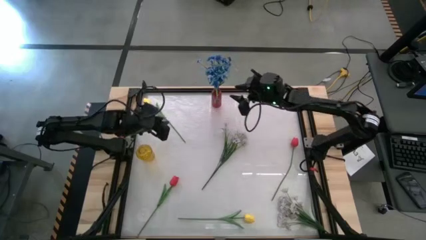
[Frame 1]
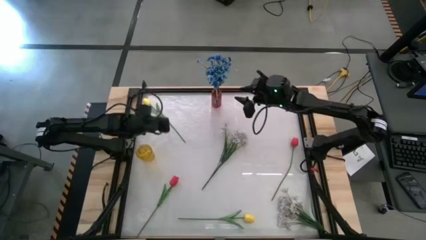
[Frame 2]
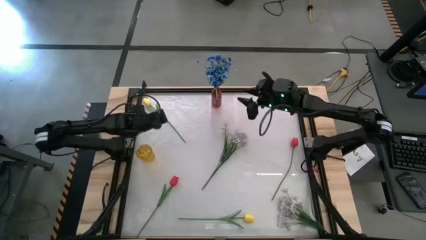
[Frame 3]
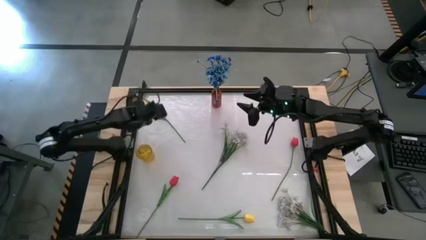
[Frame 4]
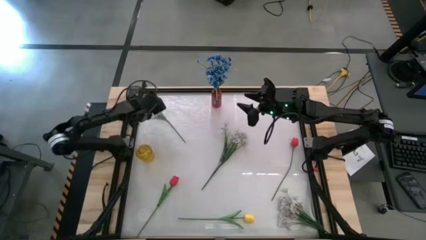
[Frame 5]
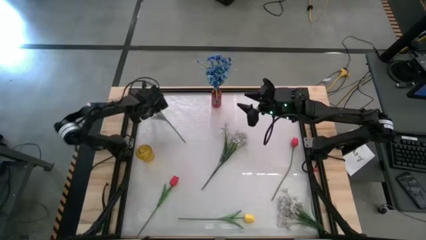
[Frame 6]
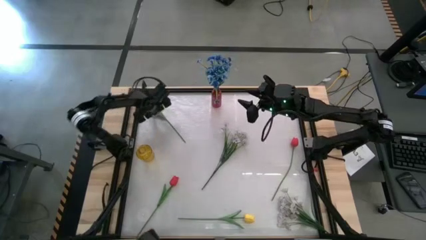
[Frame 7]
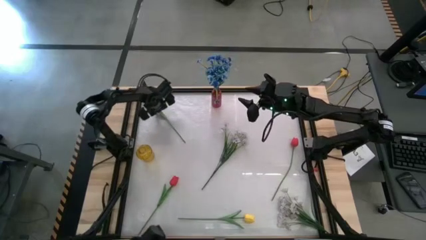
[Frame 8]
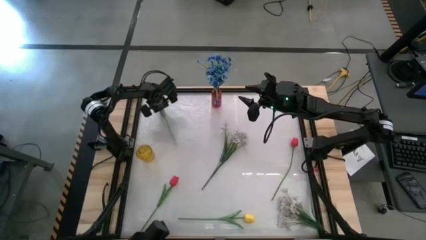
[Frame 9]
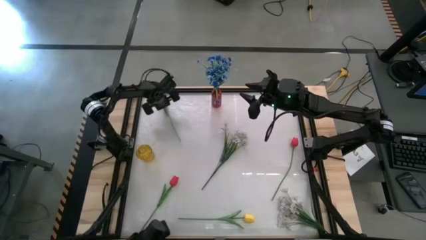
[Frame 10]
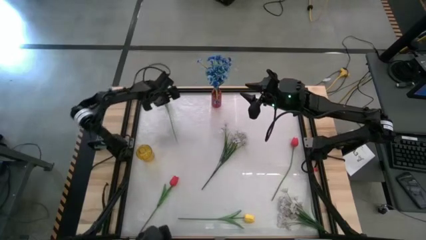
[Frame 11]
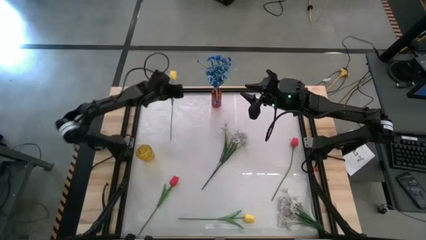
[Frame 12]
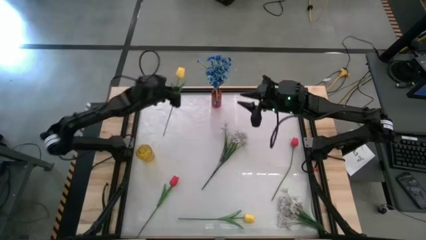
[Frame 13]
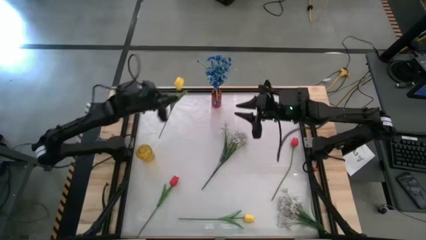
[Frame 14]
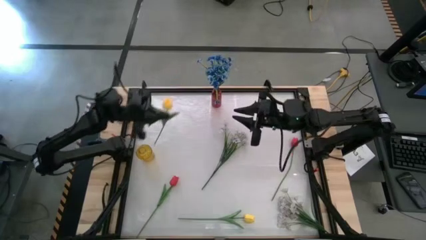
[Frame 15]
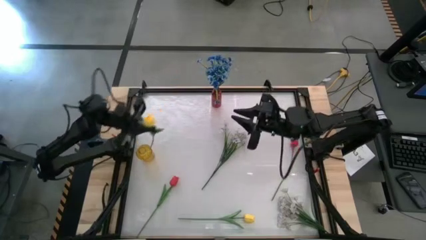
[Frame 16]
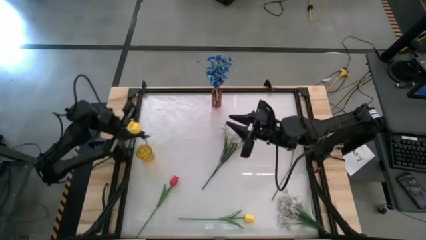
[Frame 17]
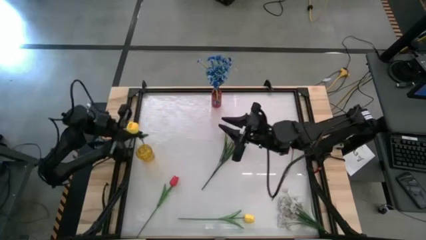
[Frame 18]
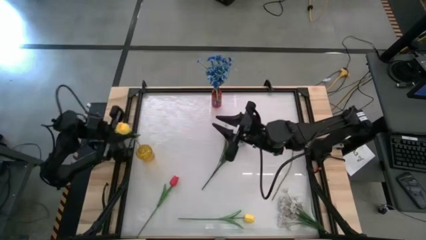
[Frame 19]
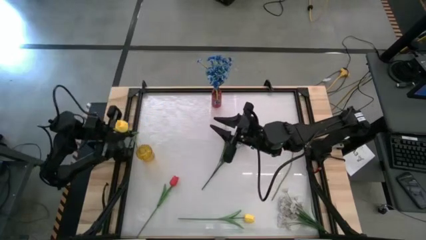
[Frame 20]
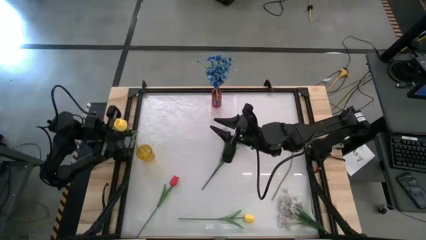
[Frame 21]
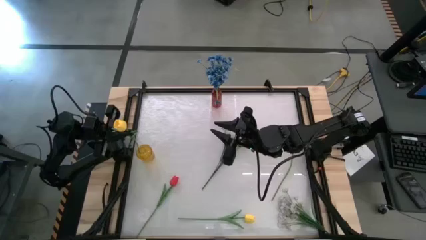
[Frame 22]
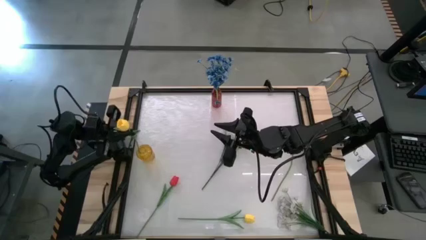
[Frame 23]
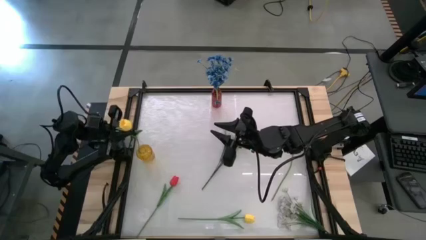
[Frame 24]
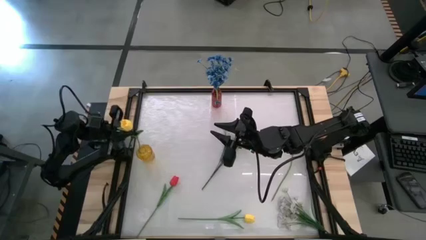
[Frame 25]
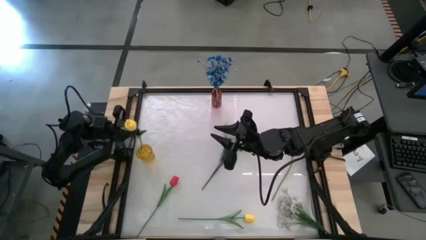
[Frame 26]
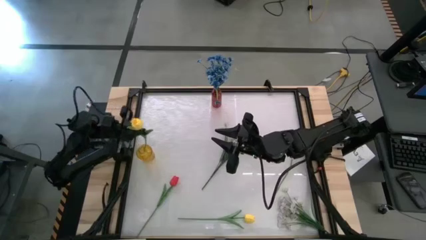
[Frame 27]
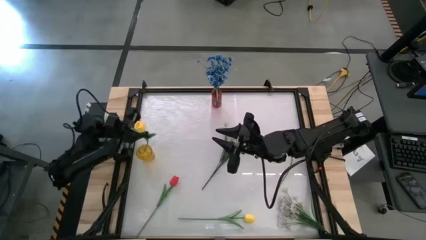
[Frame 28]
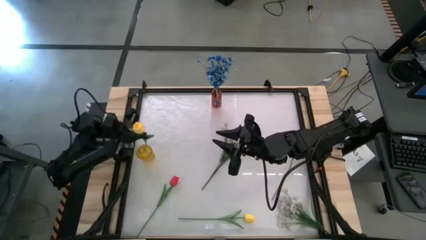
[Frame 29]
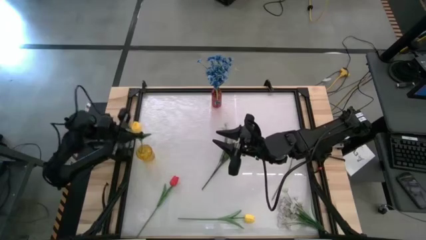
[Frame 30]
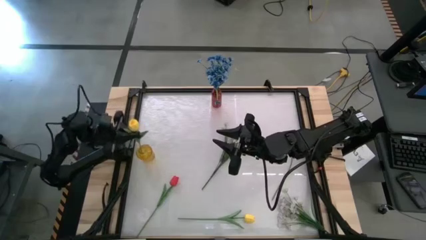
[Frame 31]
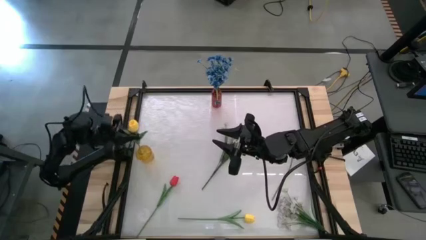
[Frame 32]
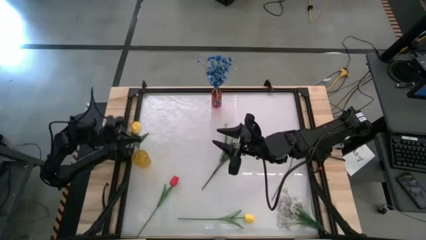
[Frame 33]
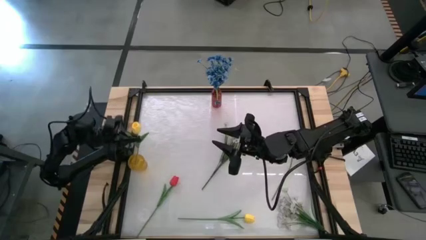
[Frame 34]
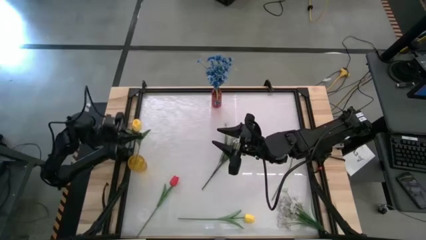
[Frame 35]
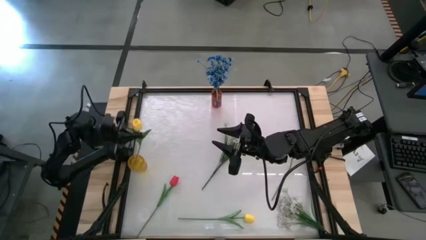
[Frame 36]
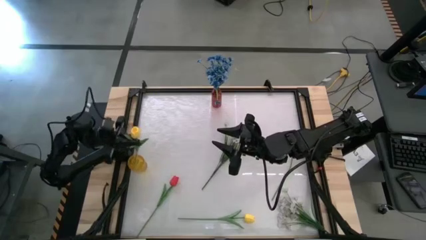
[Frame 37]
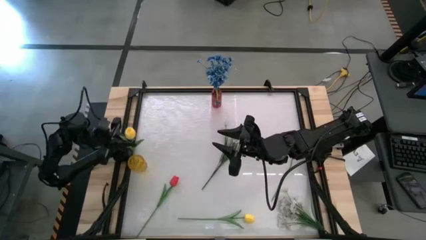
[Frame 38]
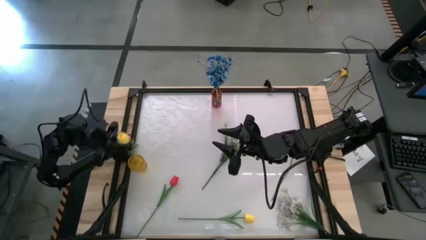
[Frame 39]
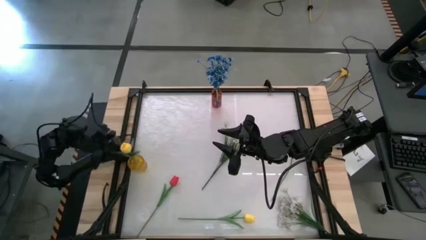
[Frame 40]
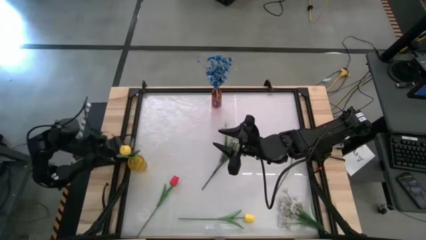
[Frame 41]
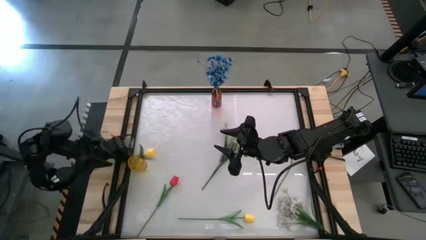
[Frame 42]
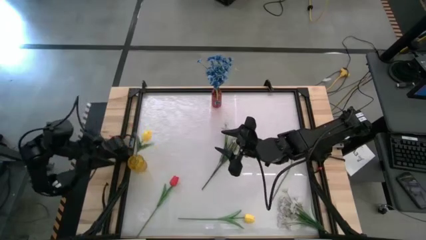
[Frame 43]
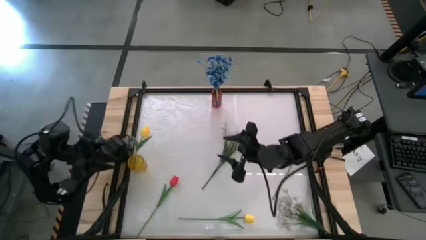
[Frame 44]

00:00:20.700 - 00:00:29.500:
Task: Sort flowers into vase by color
Put the top yellow flower into the yellow flower vase

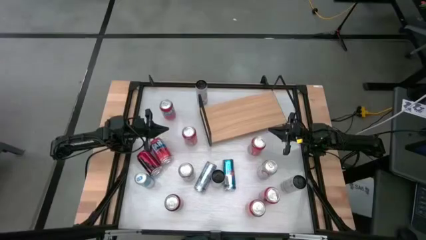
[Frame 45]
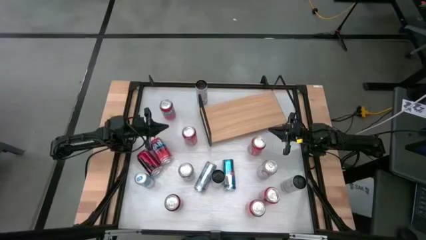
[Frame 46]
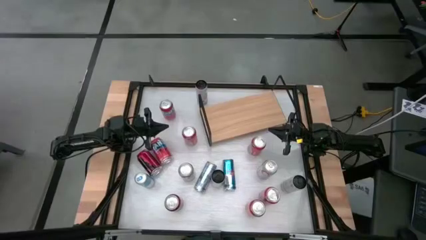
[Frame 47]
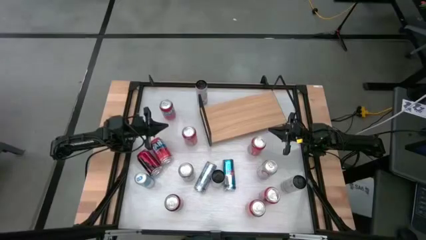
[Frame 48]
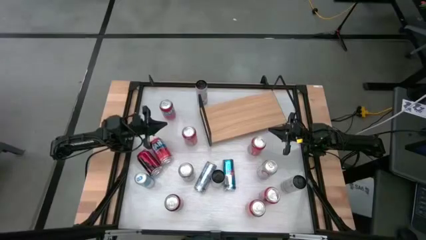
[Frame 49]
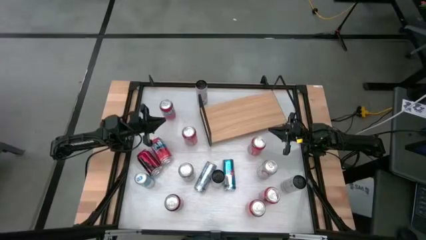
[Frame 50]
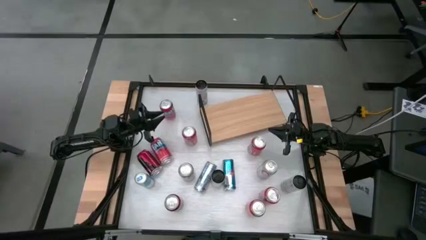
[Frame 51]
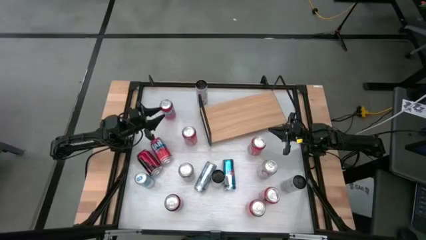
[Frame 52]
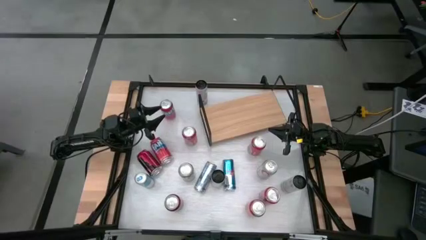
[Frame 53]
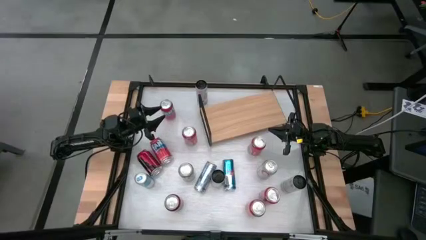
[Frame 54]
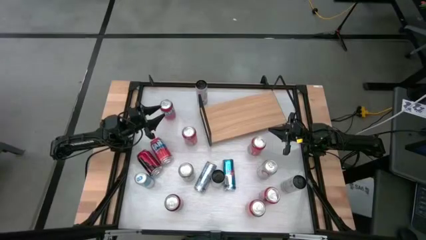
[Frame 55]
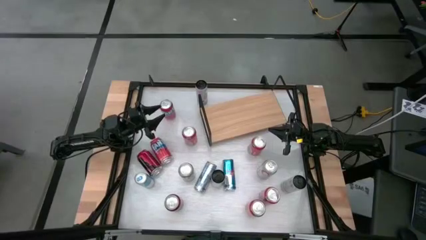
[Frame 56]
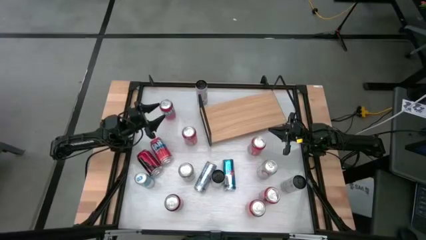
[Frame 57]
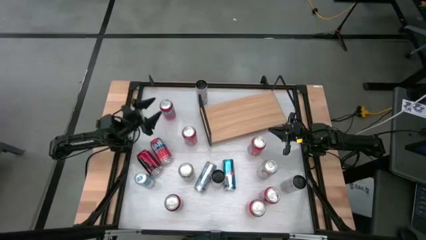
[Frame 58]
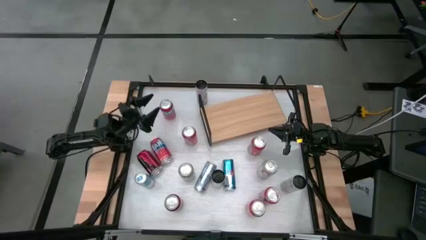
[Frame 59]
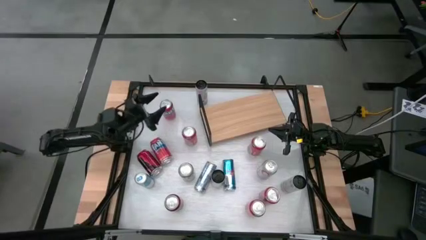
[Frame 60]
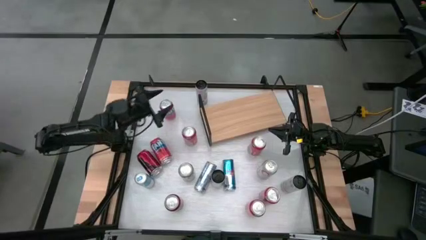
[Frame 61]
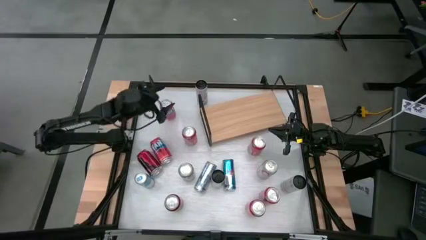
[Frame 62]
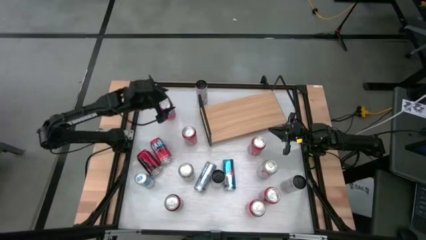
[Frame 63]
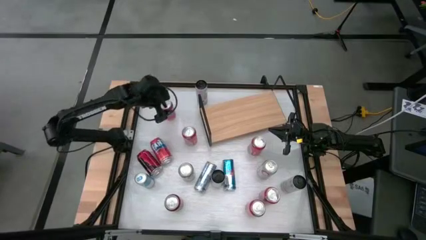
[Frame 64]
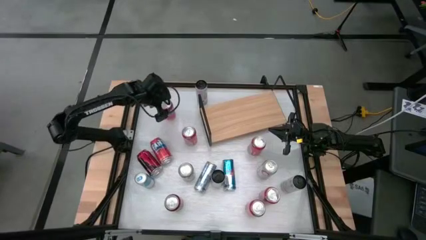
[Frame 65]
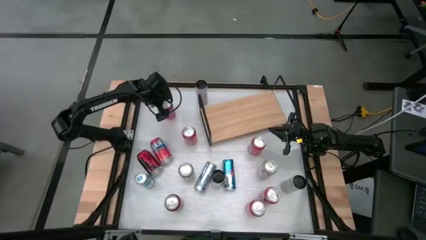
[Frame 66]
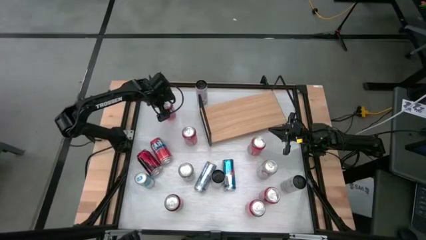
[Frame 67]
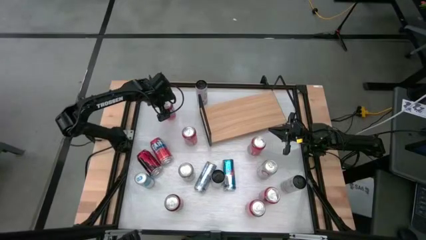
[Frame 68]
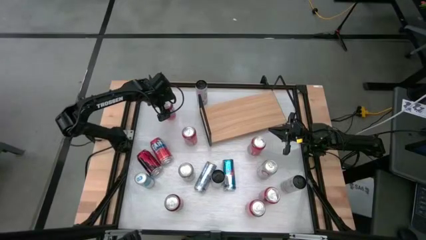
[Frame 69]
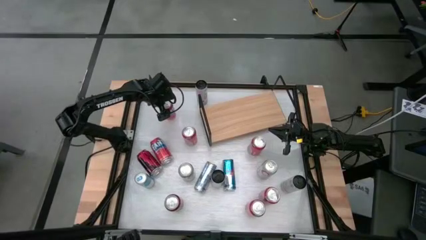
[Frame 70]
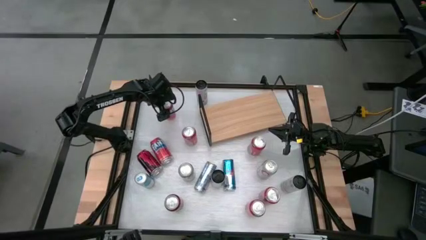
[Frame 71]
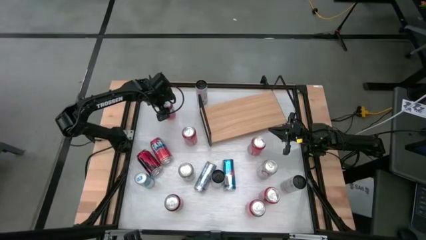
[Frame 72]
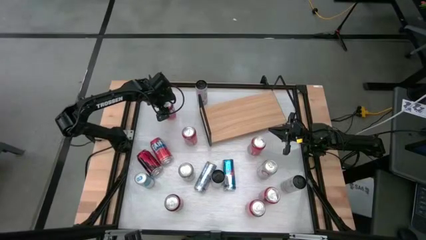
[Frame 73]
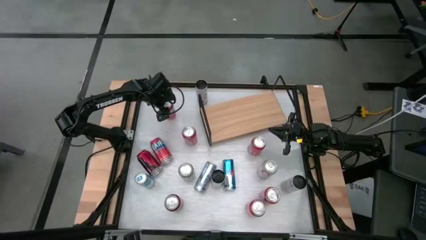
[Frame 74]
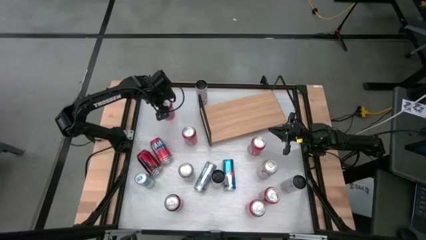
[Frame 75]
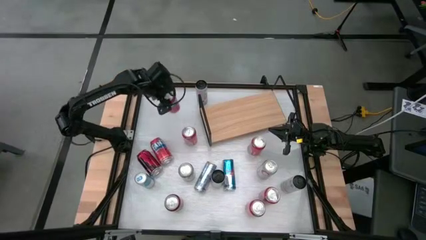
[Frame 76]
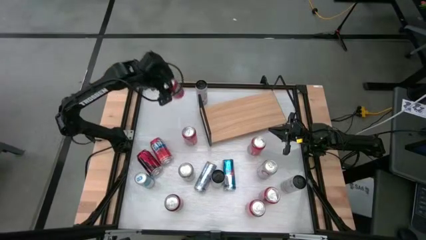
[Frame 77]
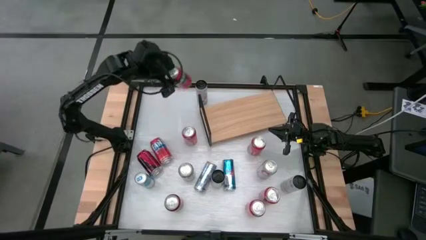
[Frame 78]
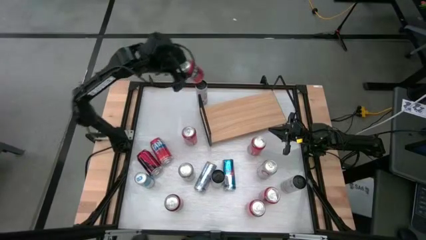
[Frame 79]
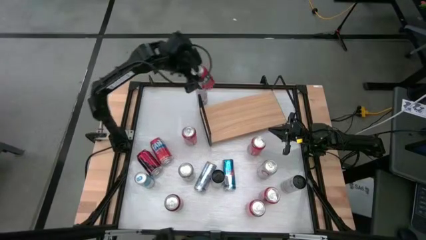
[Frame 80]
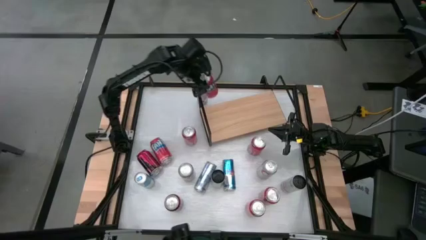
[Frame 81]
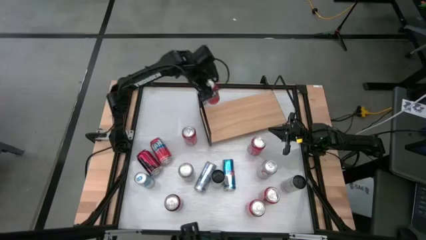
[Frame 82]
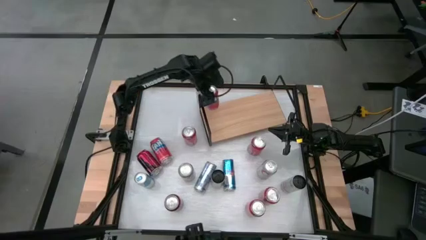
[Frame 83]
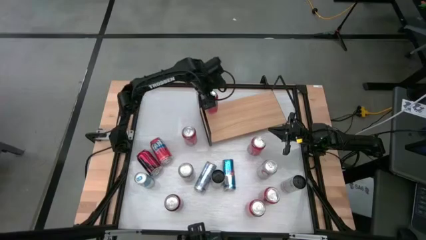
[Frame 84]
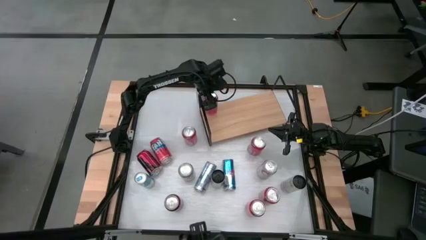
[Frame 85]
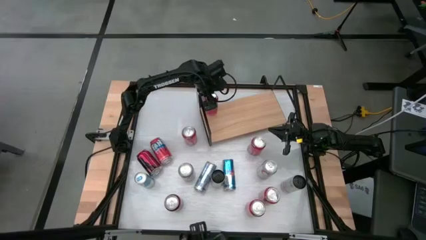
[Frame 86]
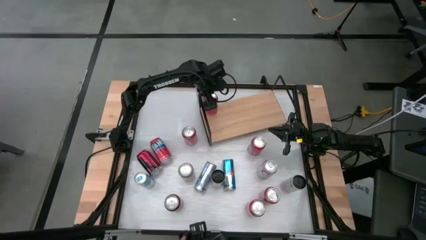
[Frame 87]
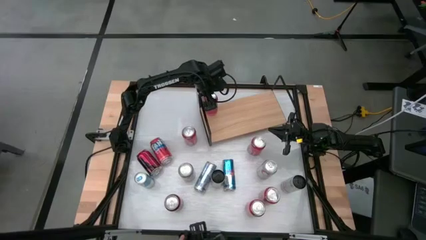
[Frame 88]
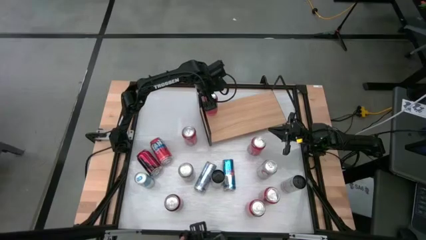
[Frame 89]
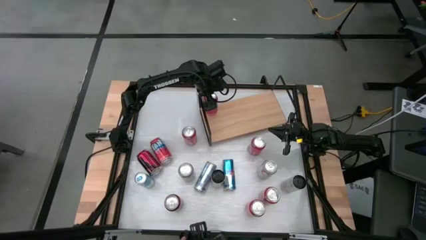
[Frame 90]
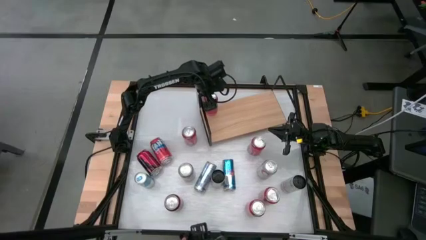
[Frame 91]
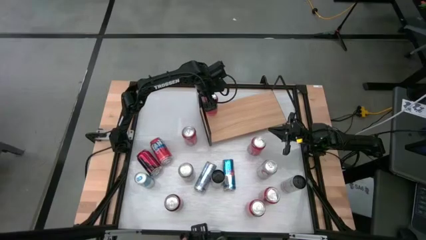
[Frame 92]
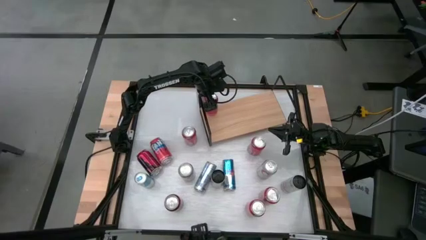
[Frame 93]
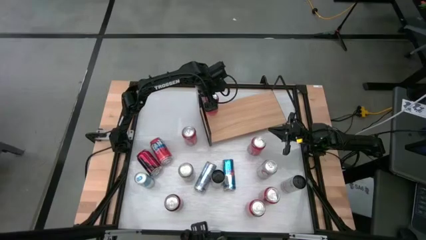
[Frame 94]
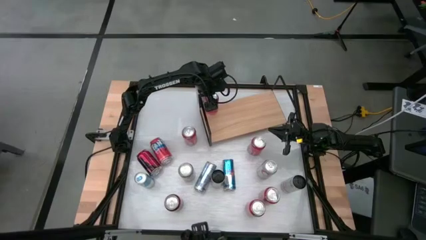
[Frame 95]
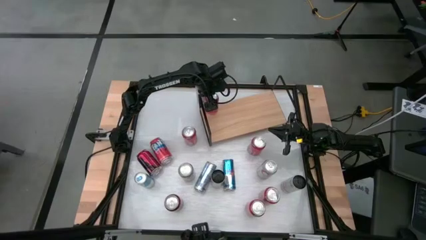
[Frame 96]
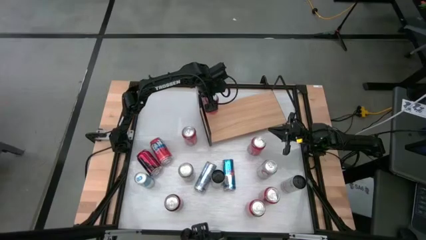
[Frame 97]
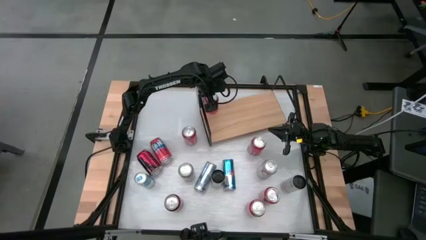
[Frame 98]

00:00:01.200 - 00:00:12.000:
Task: Place canned beverage on shelf
Put the top left orange soda can on the shelf
